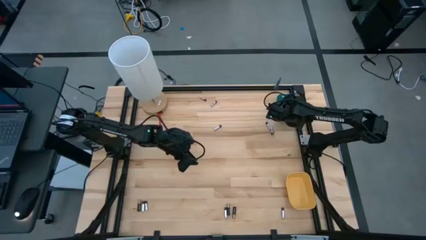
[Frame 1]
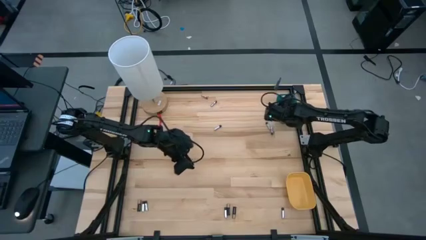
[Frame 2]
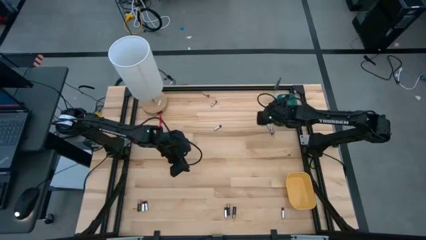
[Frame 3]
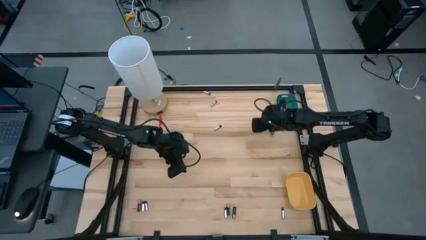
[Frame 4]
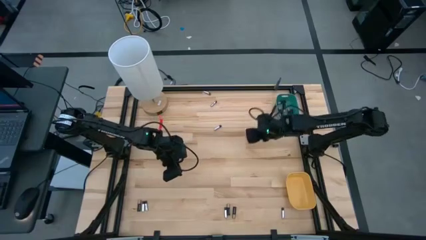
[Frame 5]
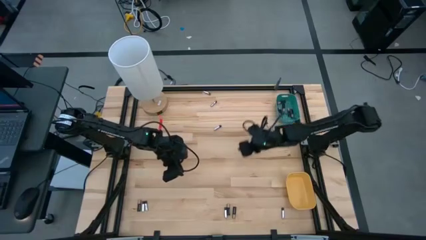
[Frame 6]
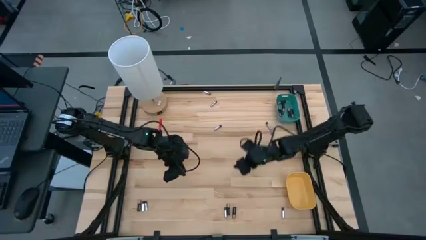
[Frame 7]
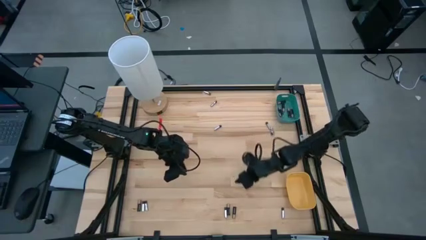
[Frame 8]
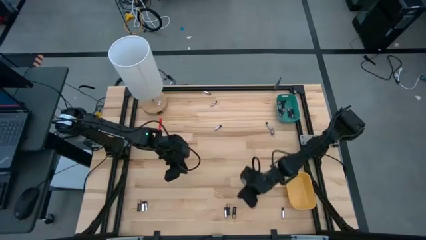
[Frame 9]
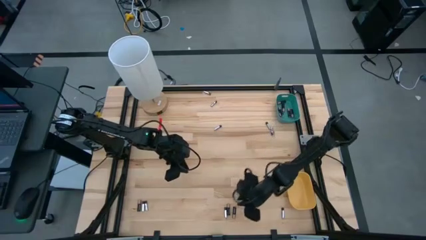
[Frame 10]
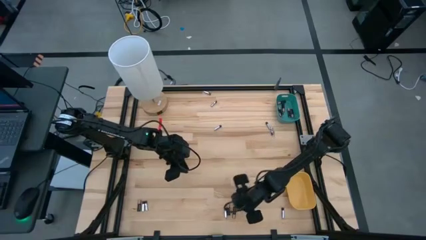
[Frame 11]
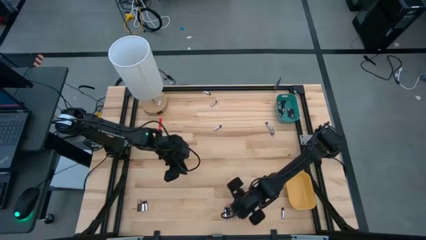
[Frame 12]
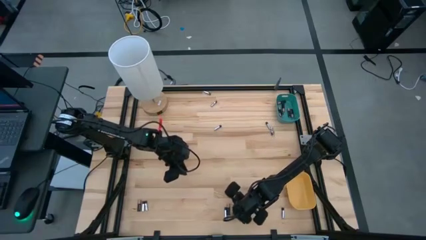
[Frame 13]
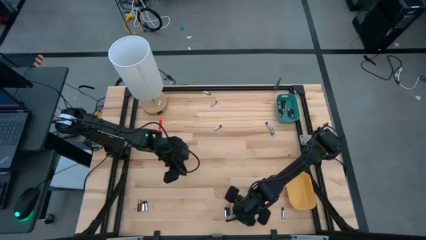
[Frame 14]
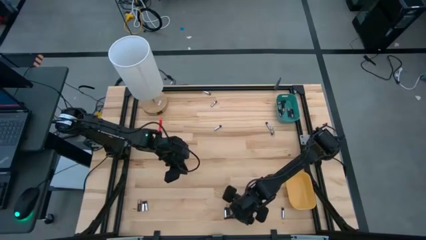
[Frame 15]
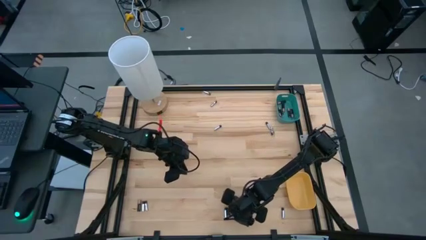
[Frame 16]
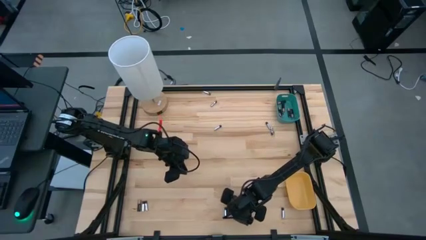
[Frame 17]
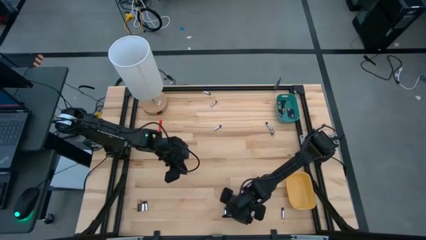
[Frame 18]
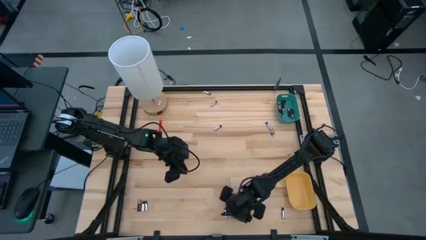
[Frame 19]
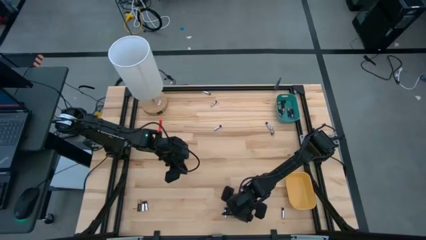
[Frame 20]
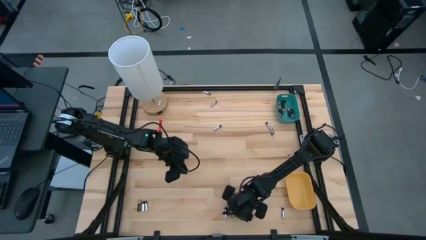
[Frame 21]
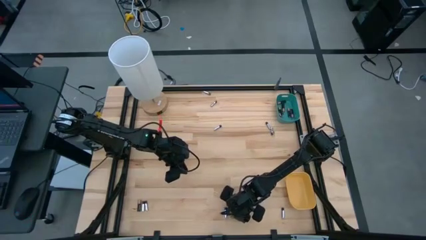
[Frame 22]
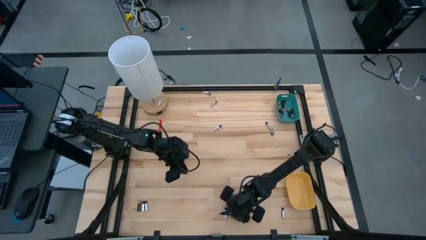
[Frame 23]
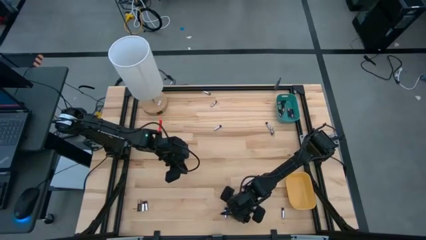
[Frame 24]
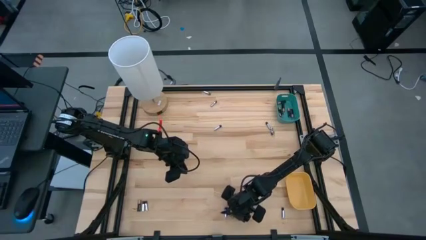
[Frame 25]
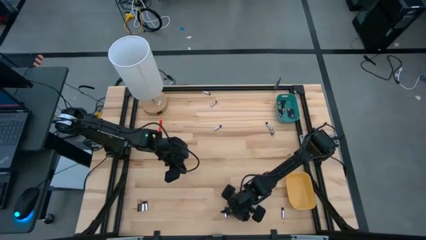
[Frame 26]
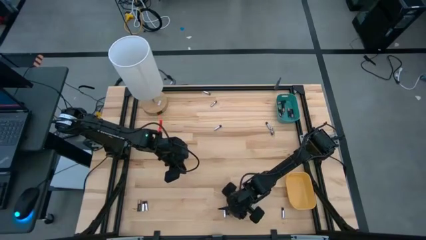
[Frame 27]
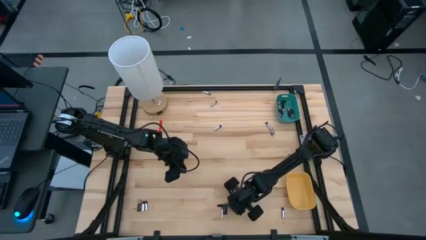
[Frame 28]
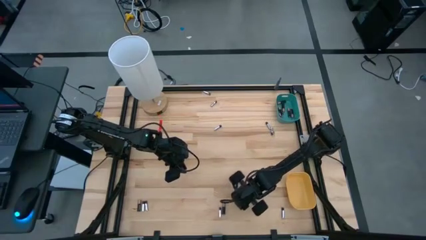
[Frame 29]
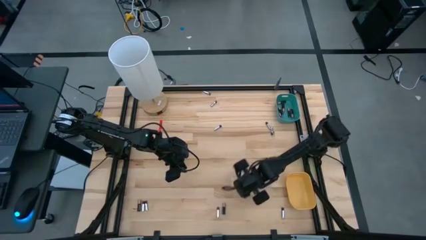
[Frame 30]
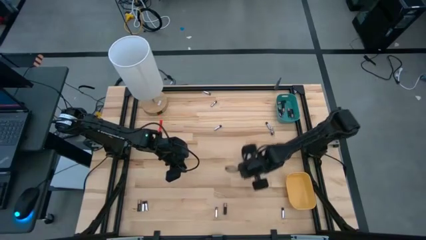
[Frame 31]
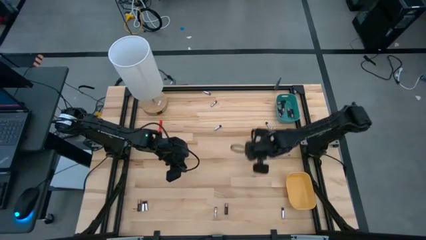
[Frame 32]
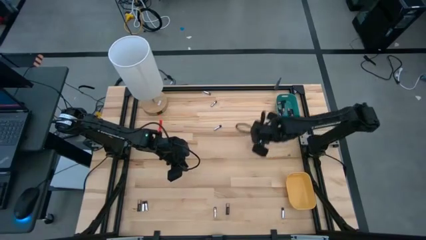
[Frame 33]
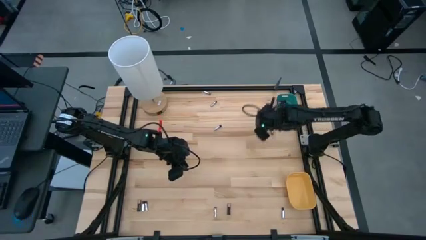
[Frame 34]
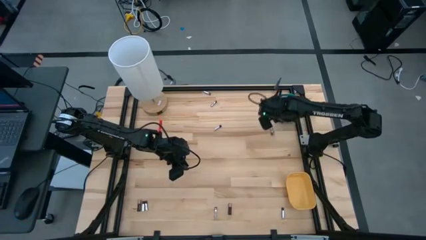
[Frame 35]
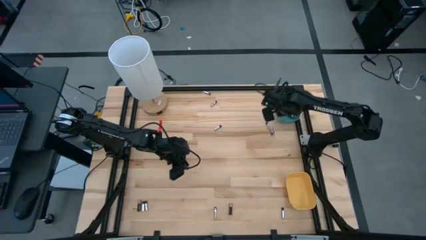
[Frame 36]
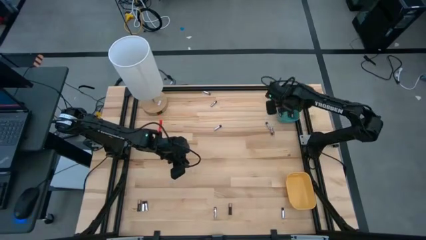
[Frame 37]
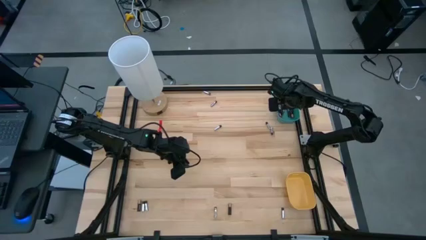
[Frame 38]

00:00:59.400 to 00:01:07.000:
Task: Sort batteries
Put the black battery into the blue bin

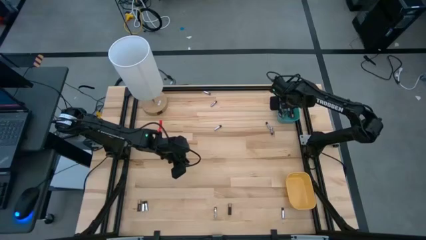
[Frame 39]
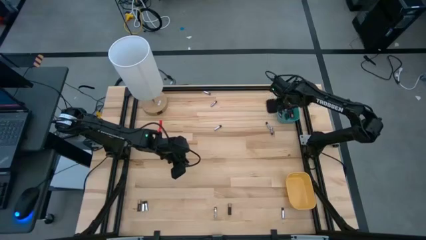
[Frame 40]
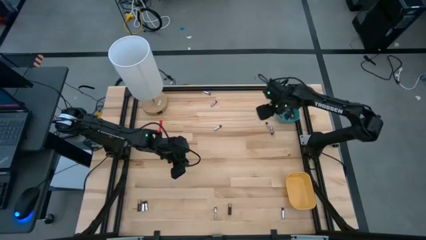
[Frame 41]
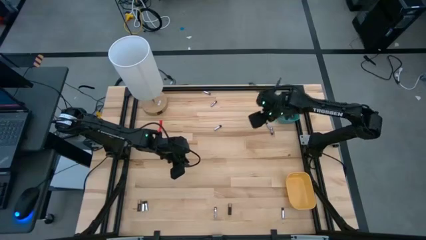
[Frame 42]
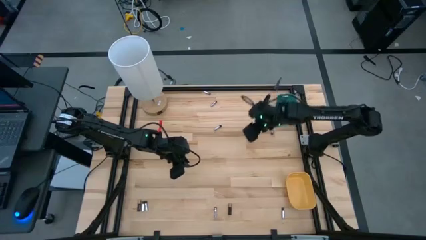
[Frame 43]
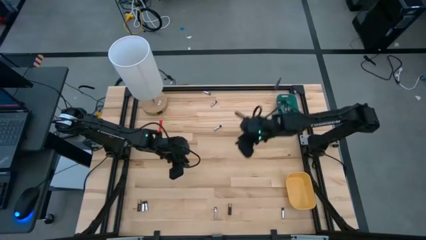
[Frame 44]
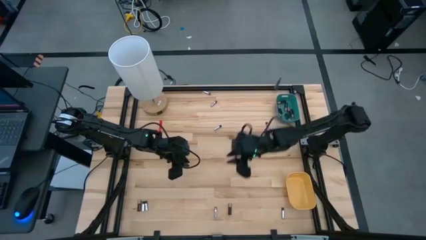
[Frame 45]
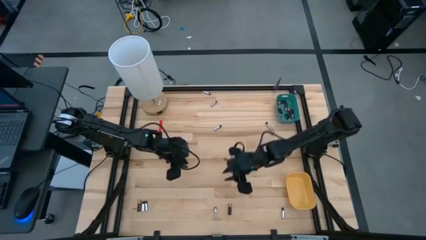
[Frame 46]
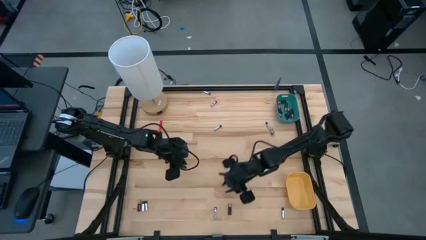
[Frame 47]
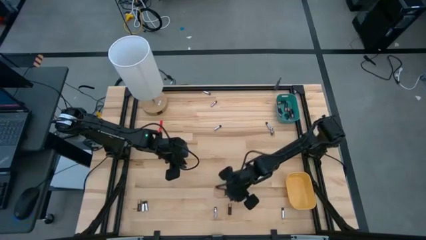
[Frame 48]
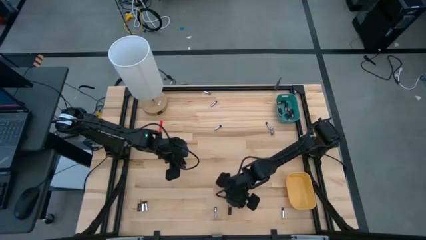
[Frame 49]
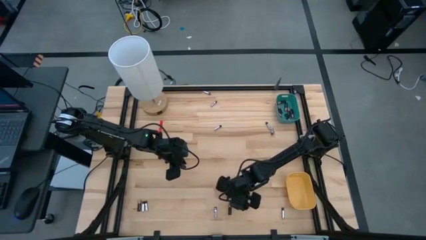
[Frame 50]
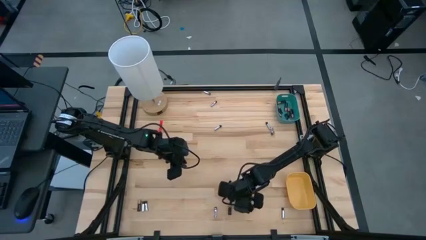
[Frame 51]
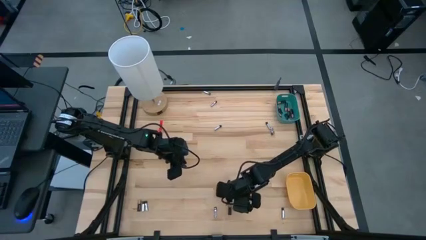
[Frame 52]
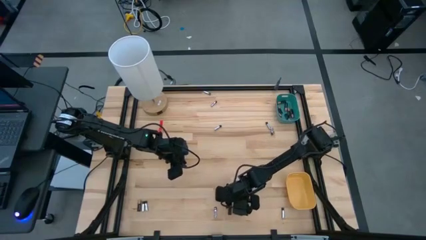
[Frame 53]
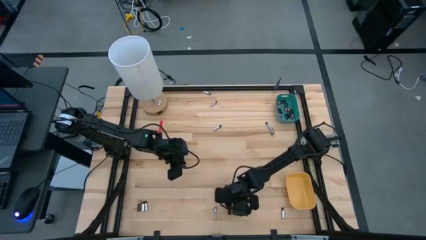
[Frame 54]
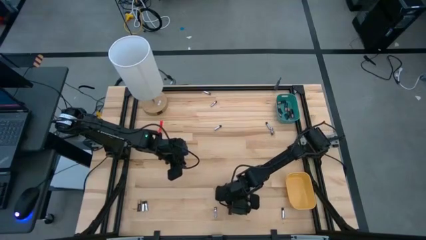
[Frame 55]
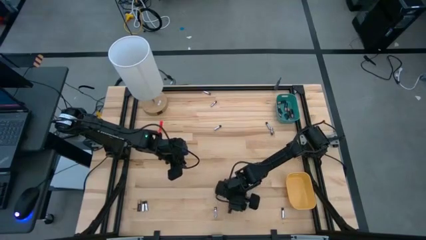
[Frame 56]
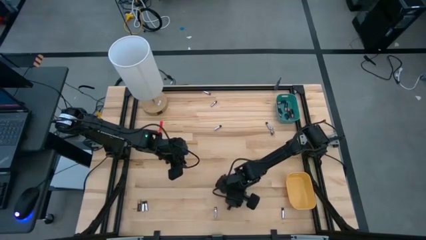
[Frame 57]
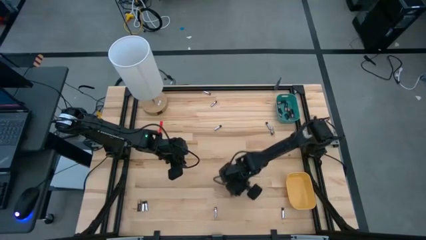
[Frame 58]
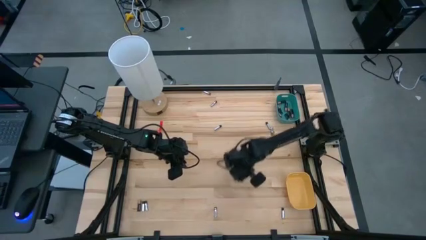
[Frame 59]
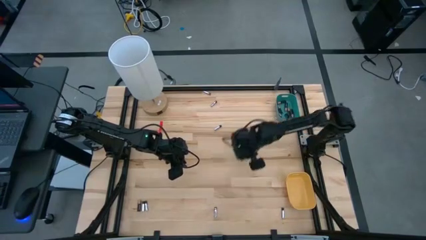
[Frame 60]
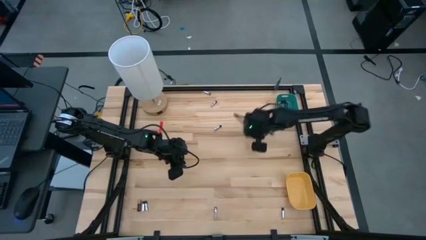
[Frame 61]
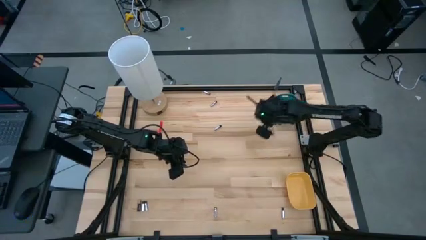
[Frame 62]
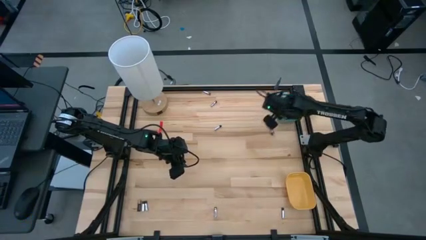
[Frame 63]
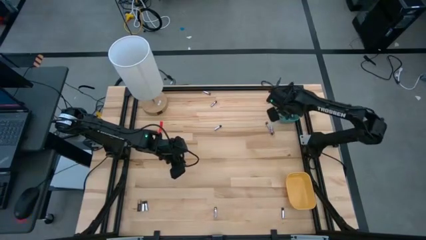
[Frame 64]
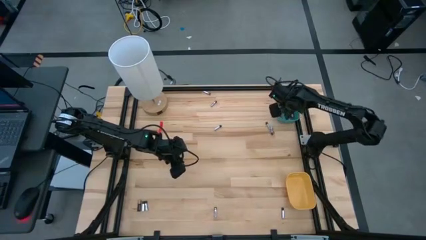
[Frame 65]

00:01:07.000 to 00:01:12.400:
Put the black battery into the blue bin

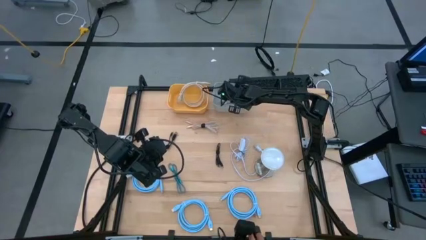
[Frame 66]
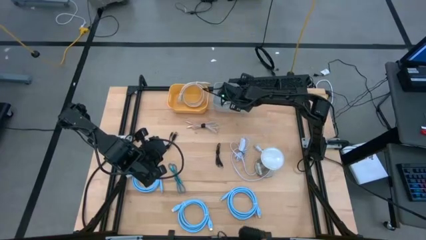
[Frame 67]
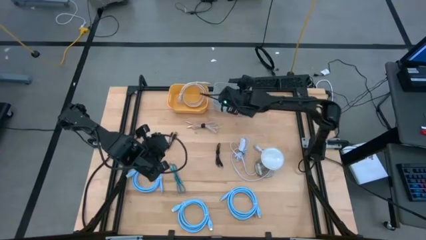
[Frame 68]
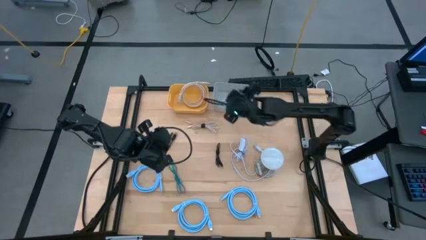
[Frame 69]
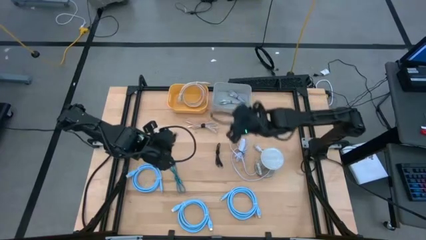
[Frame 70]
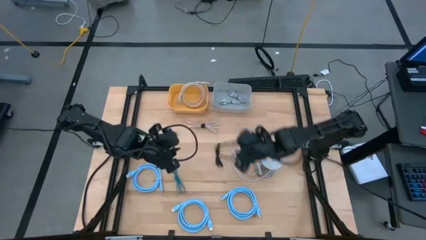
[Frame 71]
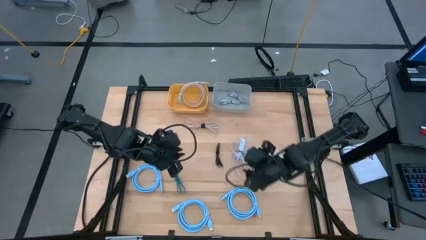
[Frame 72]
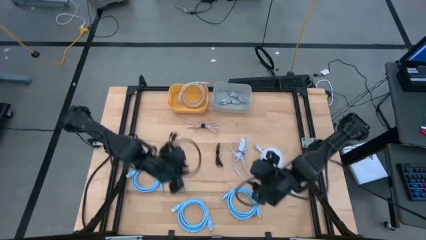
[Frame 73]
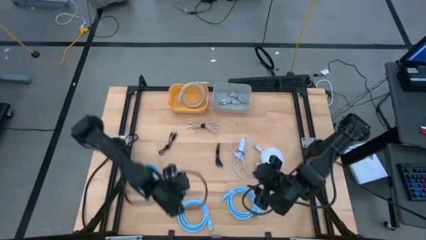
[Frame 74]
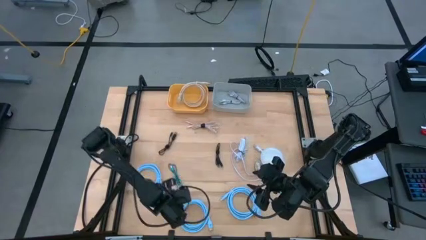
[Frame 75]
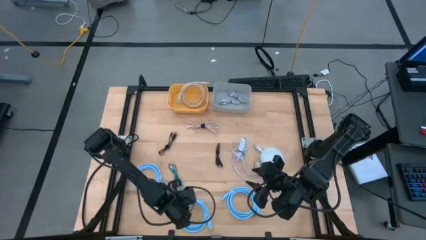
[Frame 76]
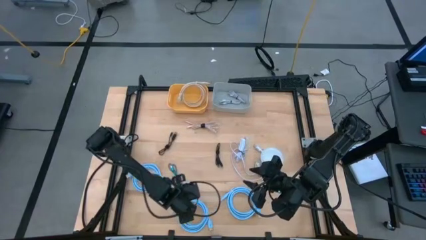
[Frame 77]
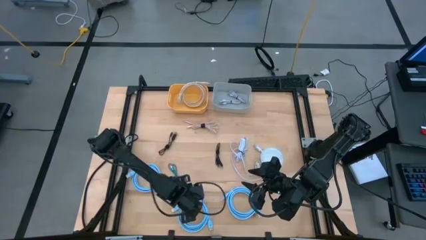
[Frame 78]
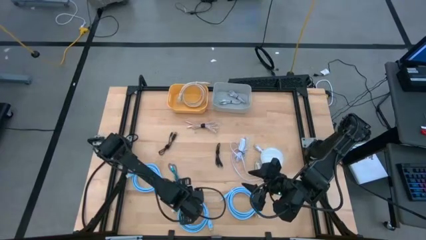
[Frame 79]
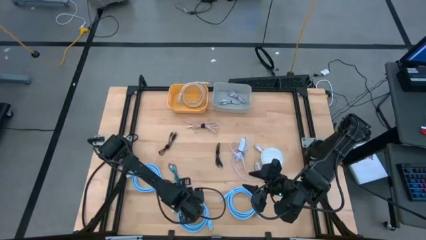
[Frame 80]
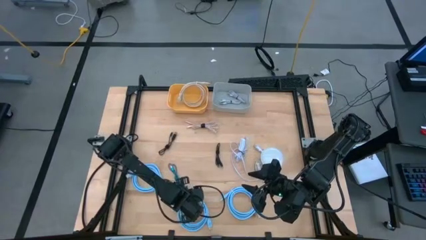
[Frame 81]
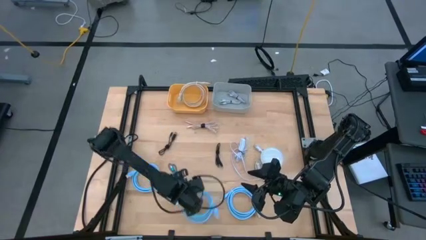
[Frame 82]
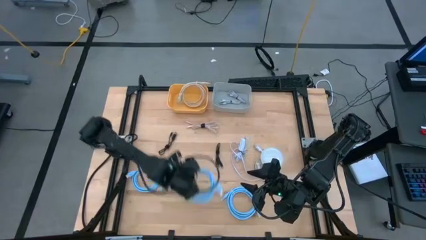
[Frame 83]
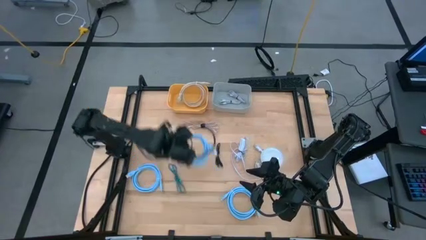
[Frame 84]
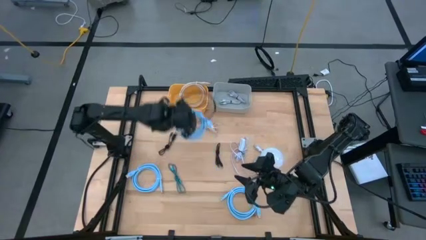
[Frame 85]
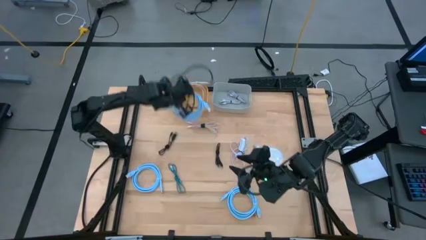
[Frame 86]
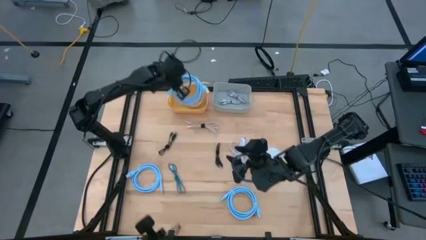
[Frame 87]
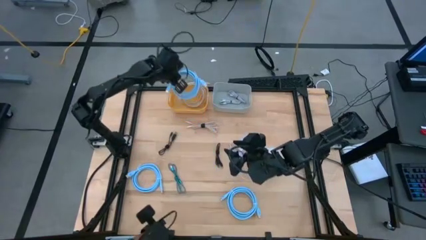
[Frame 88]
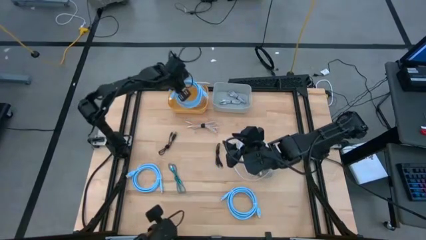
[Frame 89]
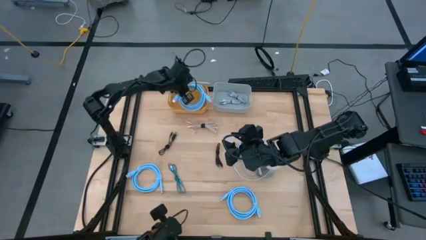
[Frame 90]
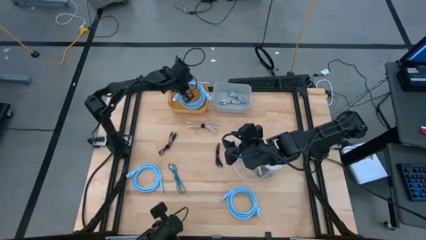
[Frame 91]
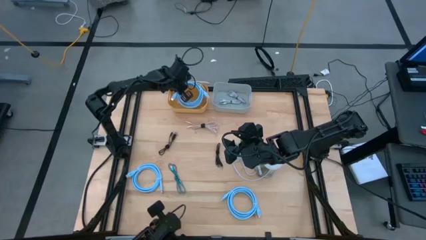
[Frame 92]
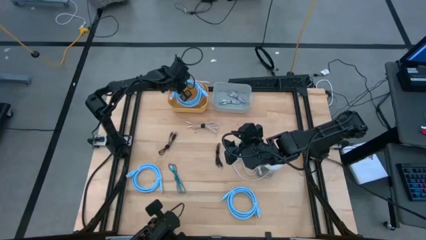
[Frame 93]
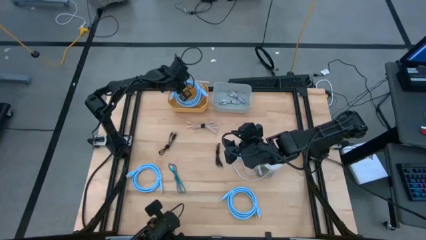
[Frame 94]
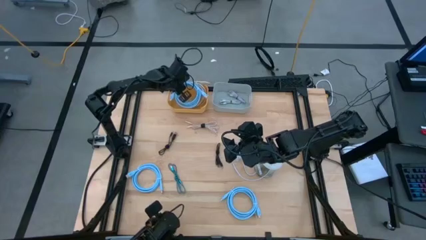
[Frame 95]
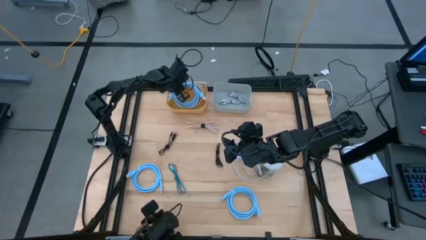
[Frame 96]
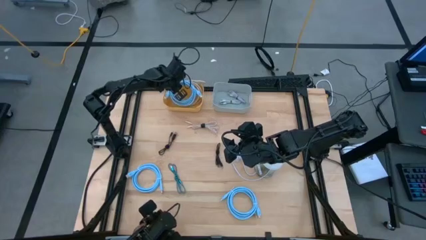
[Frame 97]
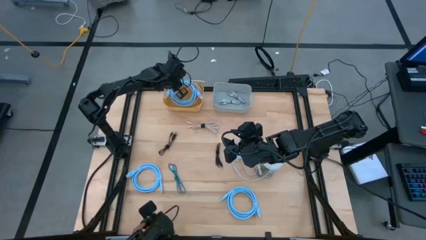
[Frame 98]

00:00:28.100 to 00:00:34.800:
Task: Pick & Place USB Port
Put the middle blue HDMI cable into the yellow bin
